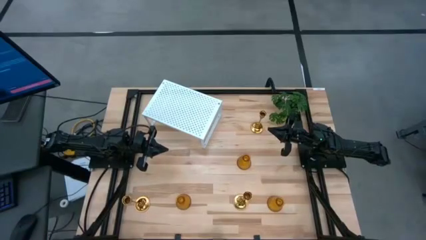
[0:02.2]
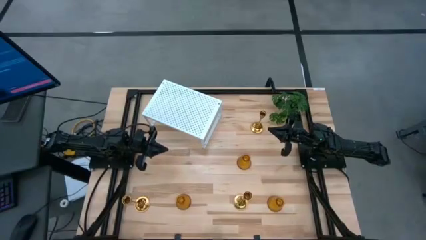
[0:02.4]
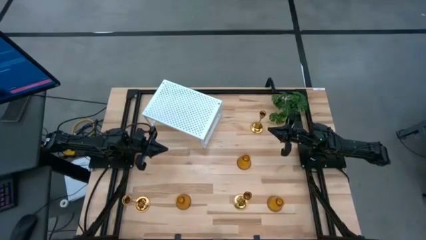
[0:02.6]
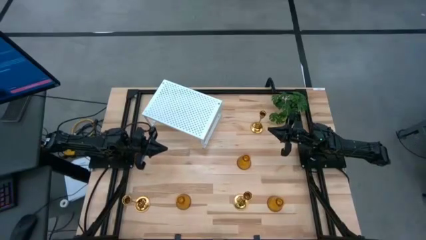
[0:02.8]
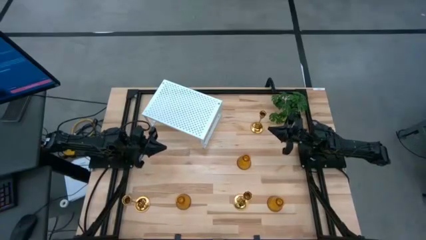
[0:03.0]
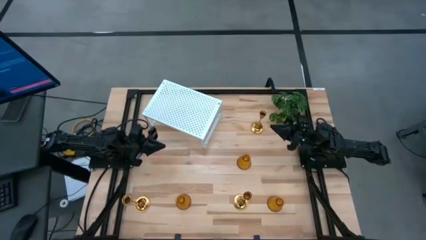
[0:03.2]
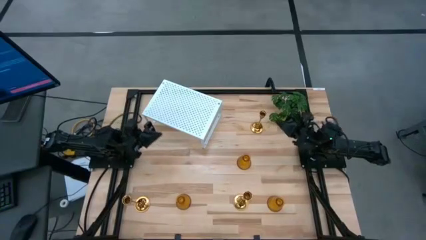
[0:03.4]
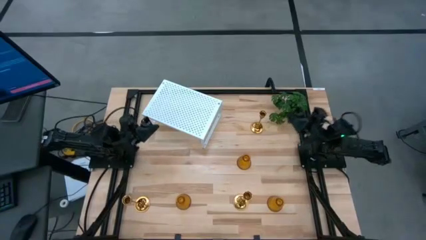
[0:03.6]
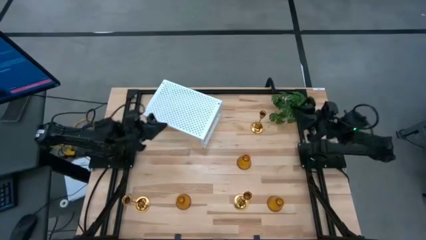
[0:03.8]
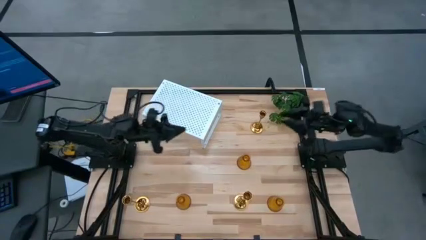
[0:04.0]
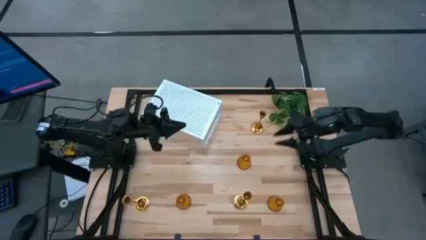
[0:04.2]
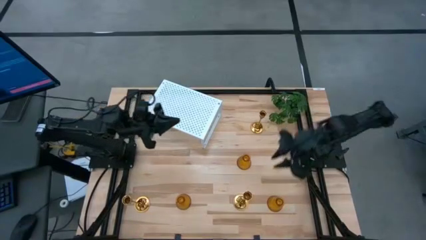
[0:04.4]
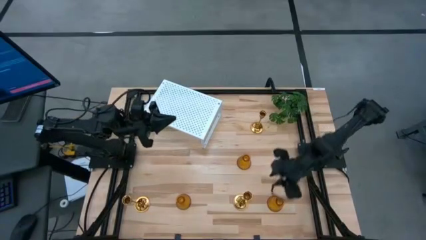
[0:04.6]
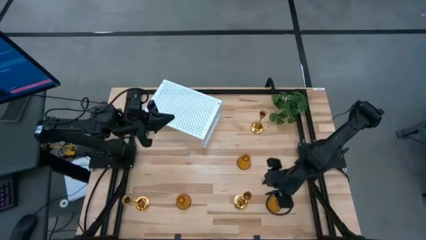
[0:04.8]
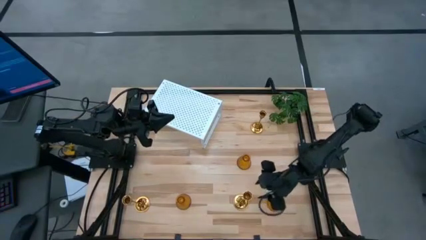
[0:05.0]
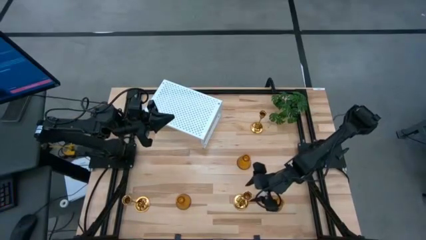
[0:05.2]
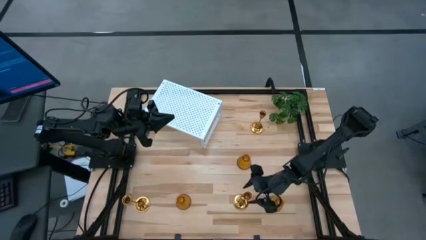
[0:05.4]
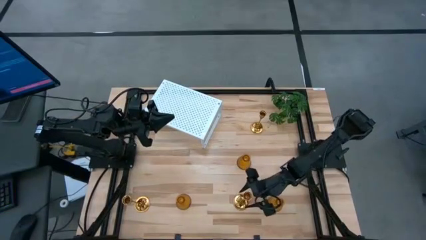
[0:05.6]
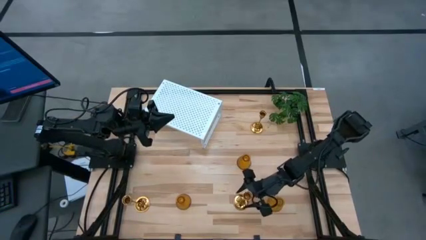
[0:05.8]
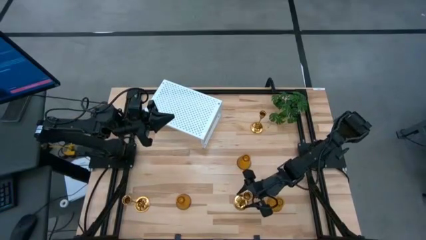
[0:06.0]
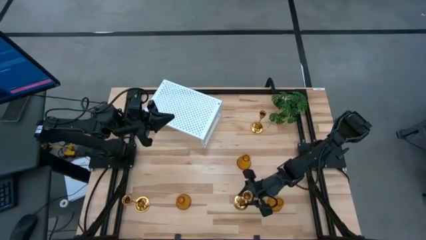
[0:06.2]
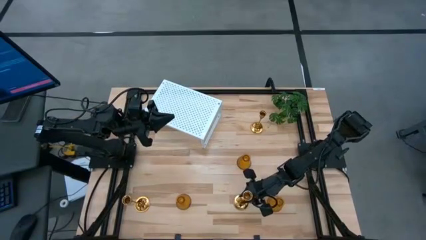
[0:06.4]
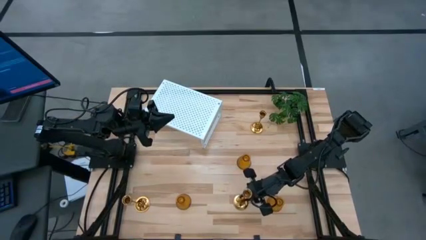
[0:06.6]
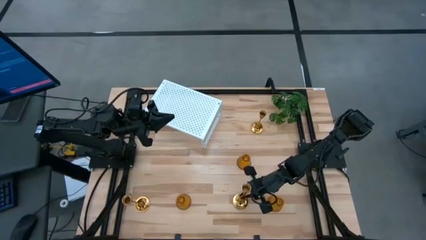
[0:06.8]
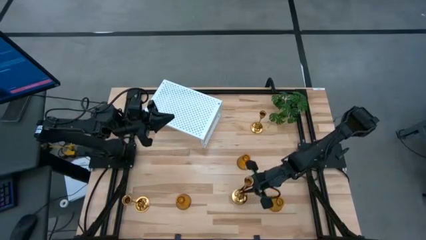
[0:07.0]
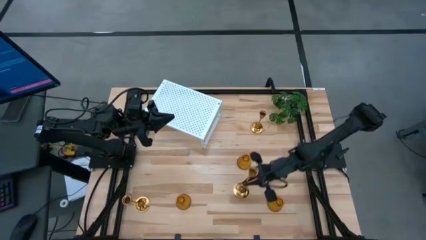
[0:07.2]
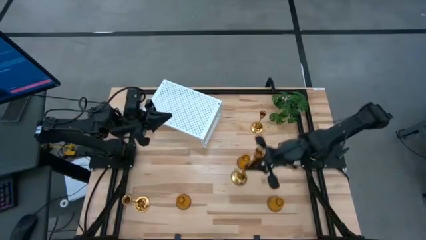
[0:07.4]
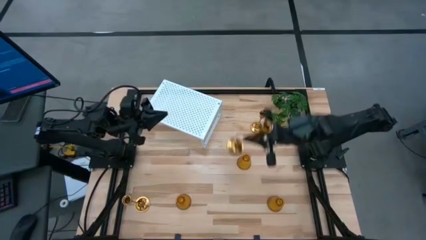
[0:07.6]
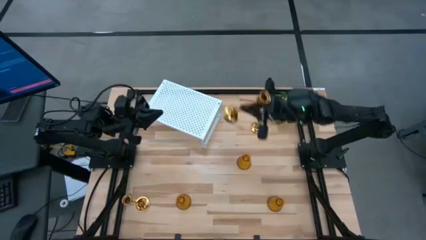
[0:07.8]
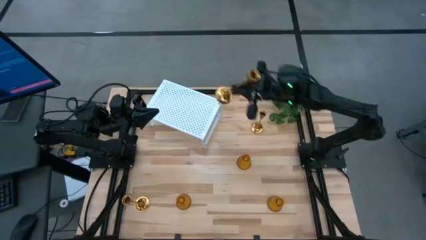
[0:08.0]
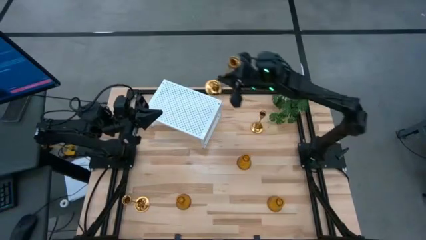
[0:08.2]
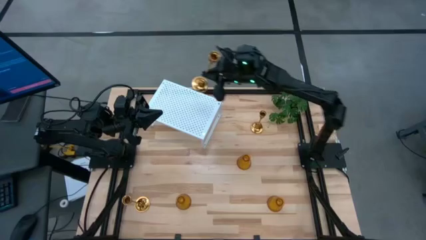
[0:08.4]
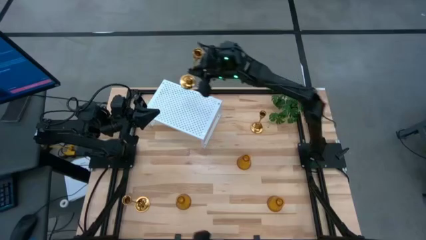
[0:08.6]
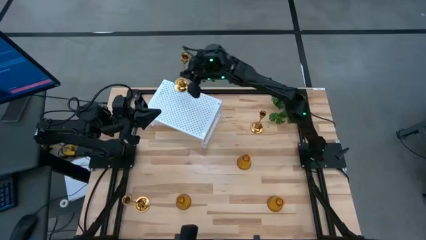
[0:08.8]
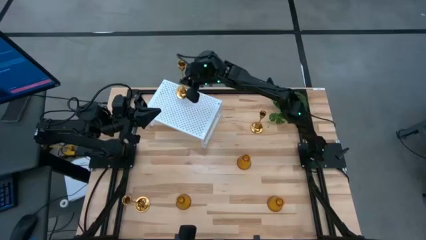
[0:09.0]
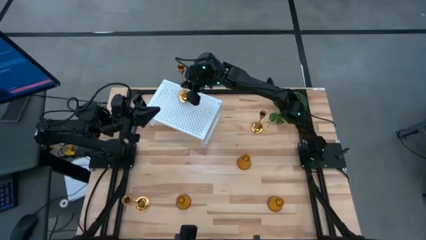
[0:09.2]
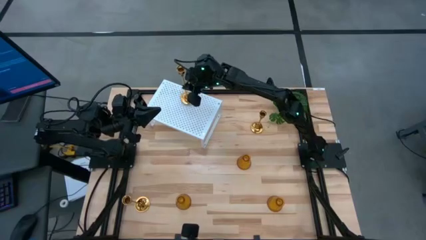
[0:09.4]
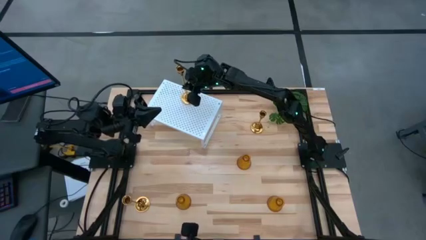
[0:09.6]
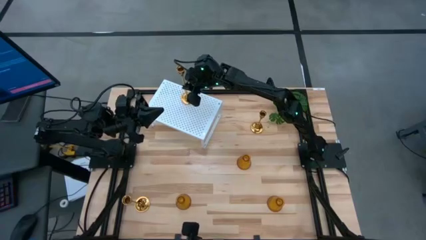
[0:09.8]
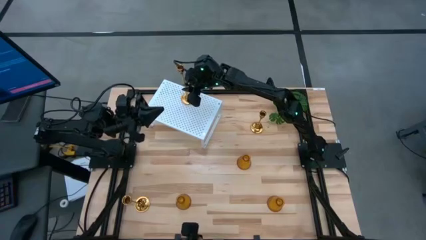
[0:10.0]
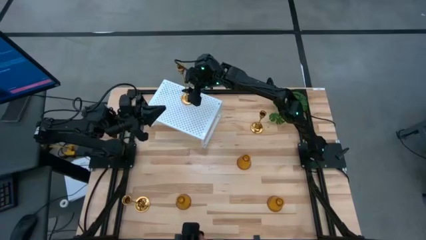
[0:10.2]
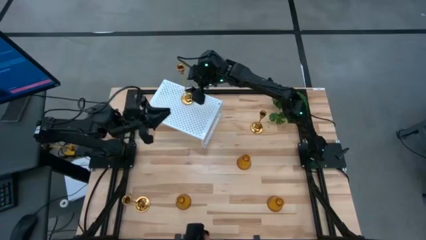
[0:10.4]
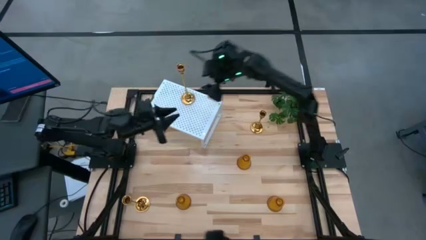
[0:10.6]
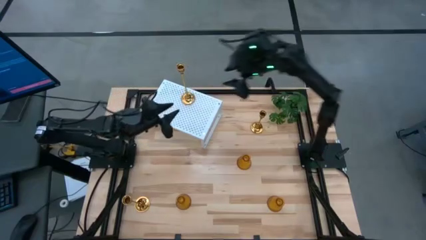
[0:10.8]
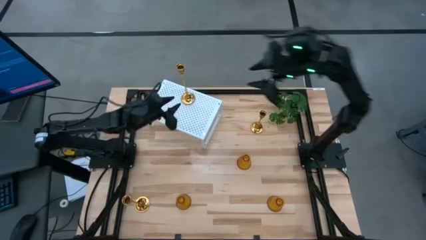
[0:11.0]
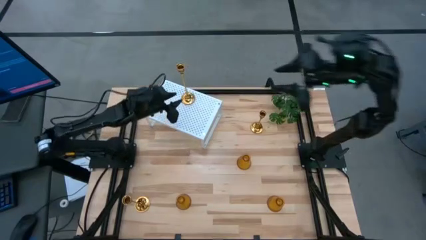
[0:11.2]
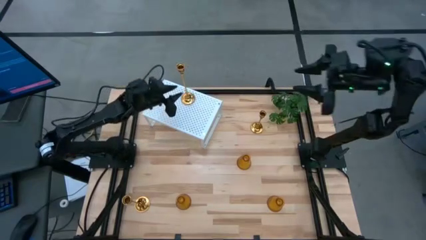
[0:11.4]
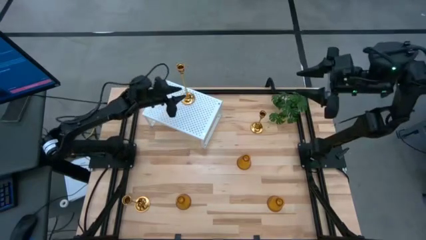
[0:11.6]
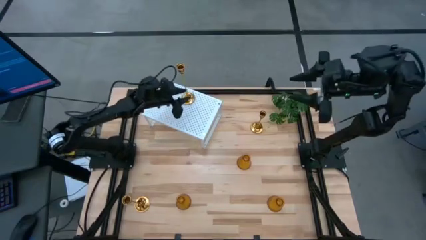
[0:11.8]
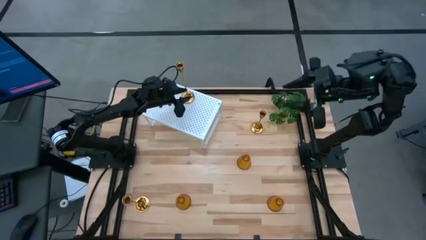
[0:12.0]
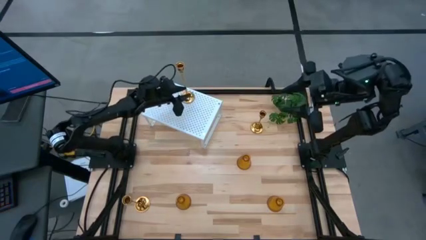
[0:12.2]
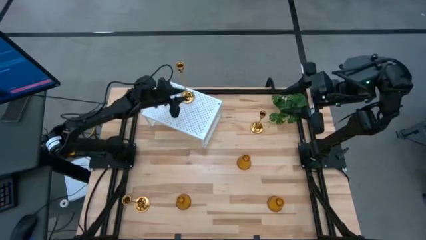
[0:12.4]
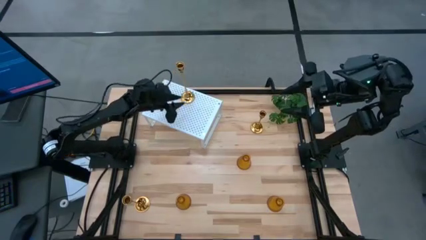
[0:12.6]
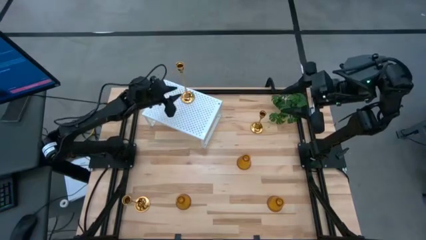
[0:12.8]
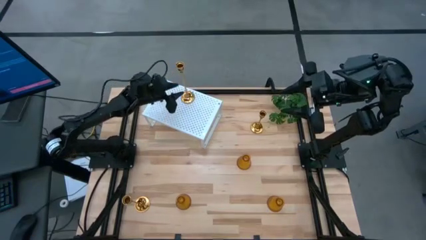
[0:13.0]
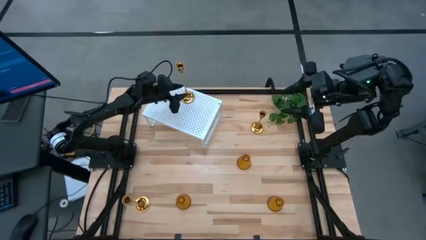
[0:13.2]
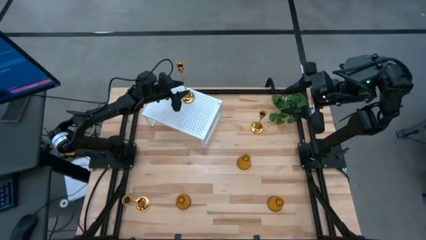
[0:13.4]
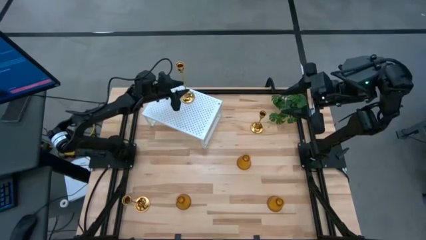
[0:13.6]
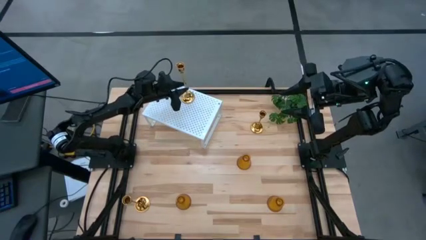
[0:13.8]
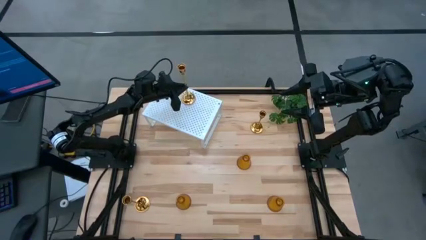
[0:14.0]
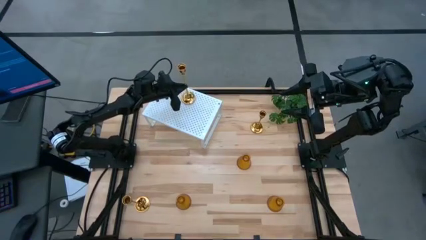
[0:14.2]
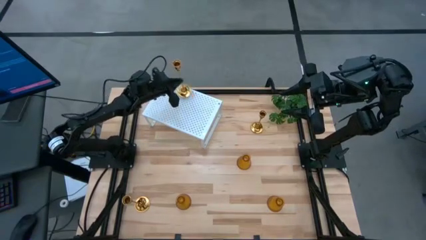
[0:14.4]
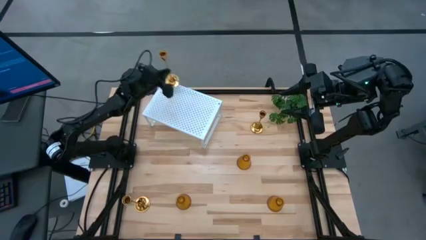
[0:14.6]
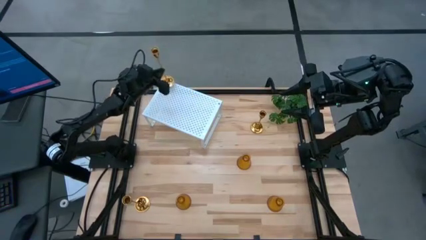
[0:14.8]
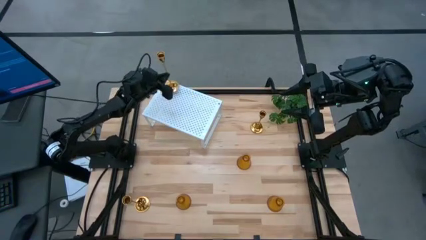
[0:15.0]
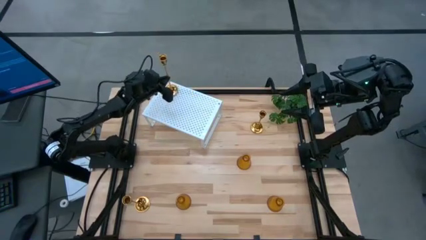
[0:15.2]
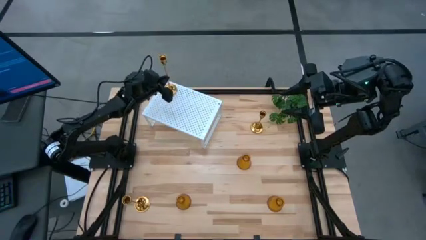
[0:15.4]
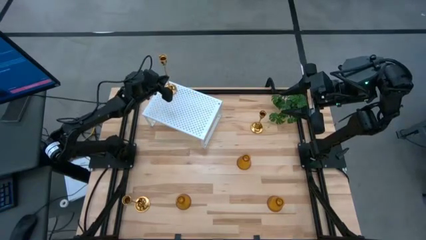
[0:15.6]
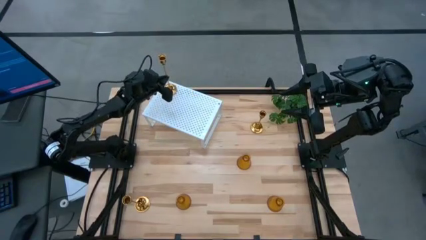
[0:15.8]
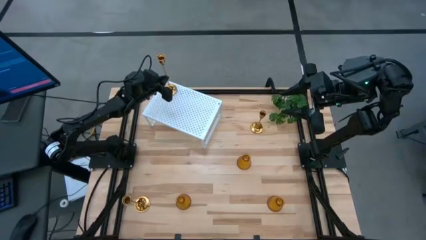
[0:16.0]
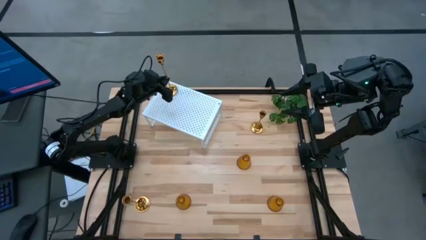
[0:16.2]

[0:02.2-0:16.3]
Task: Pick & Place candle stick holders
Put the bottom right gold candle holder on the shelf
